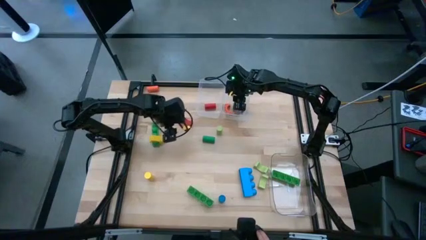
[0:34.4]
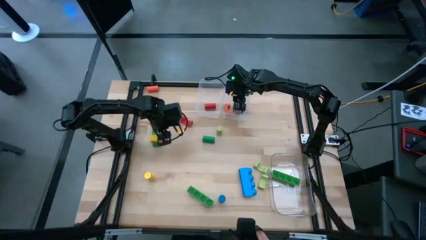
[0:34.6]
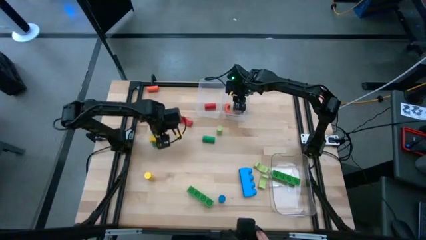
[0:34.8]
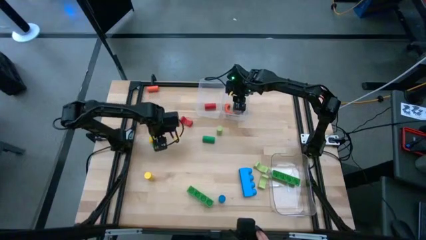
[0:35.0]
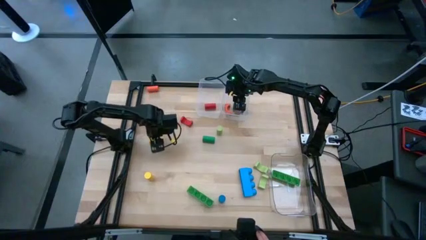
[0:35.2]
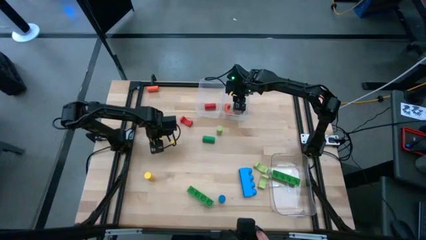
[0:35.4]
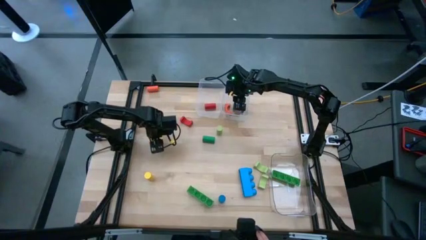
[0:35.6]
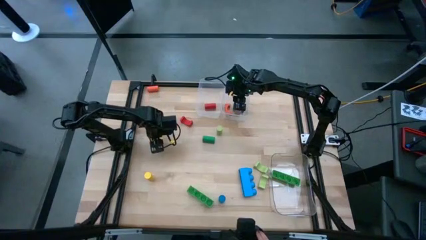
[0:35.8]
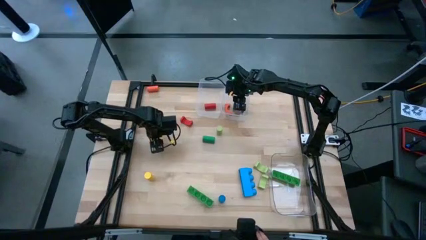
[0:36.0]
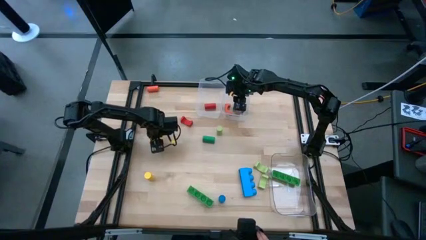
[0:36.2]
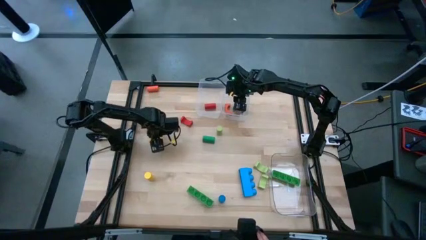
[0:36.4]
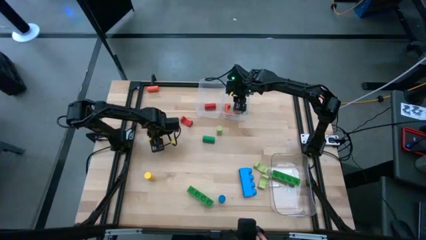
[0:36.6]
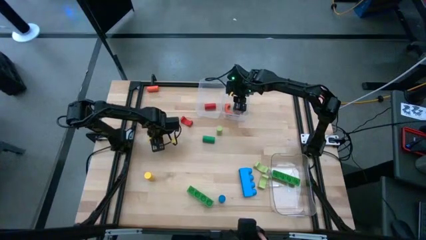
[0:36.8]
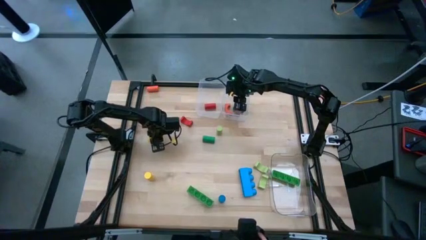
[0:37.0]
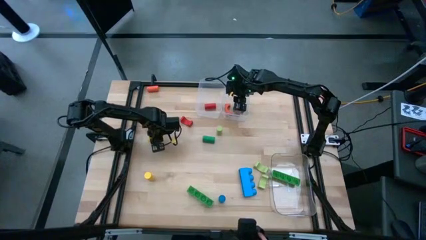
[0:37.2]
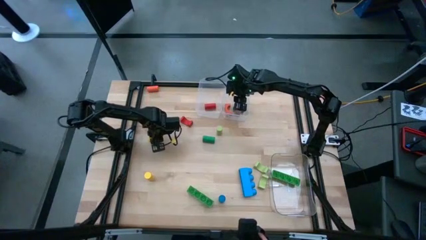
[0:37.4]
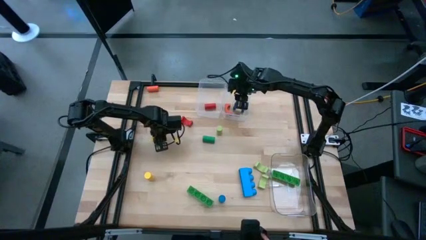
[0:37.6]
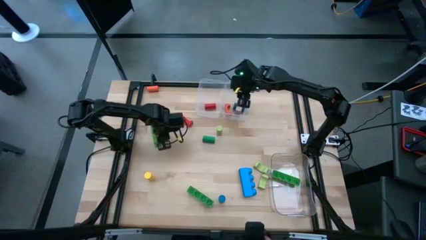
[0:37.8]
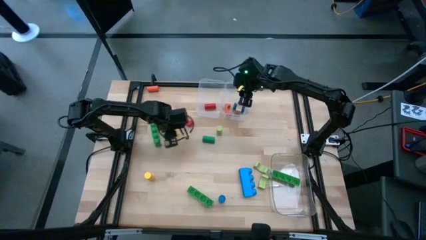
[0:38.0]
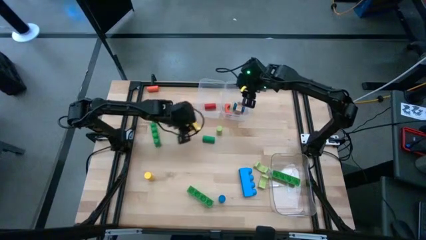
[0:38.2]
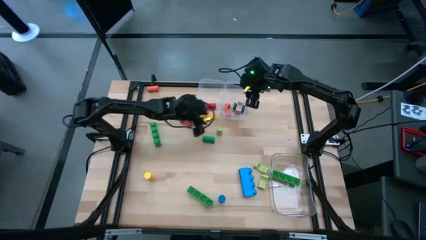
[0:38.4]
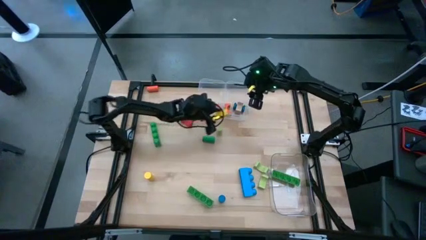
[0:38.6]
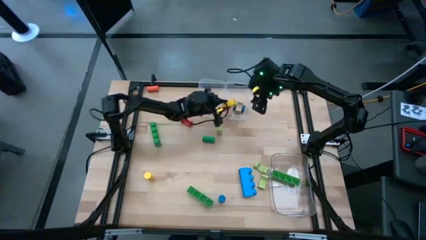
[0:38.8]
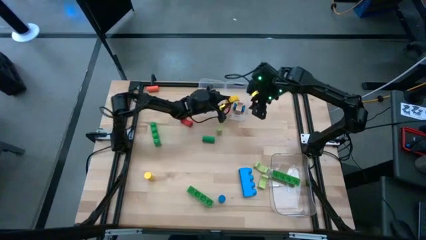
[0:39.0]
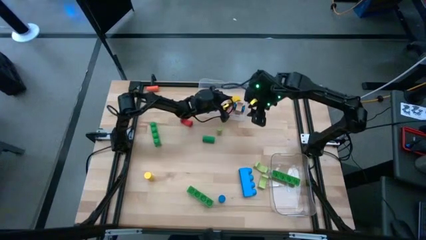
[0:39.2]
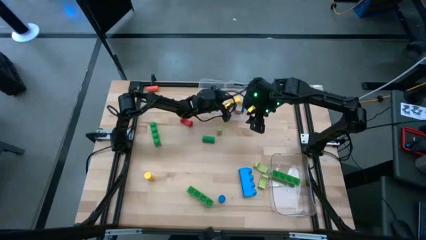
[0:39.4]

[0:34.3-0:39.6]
Task: Sort blocks by size
Put the yellow arch block into the right transparent bin

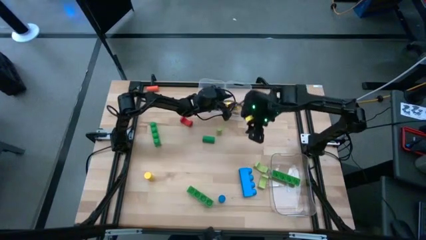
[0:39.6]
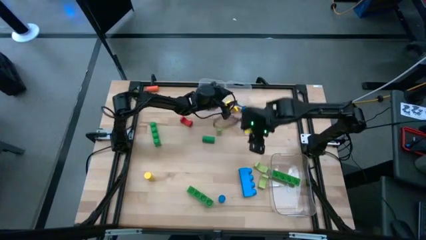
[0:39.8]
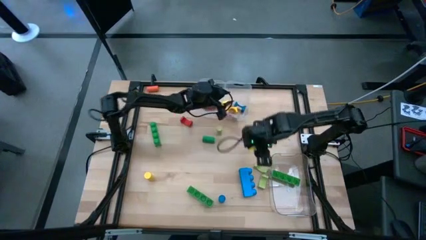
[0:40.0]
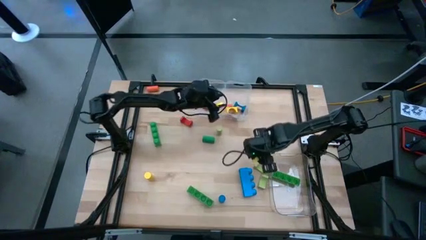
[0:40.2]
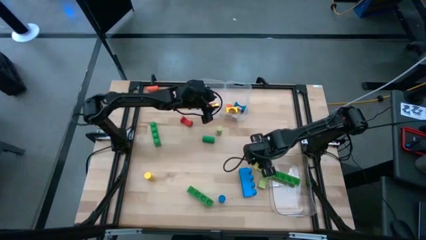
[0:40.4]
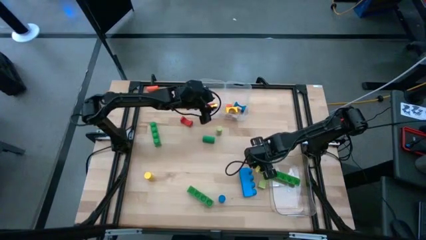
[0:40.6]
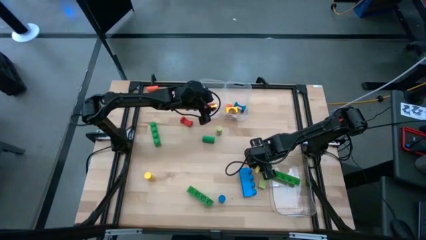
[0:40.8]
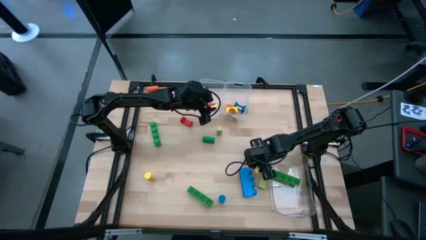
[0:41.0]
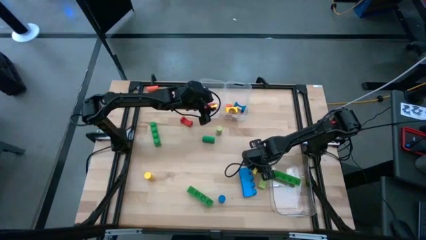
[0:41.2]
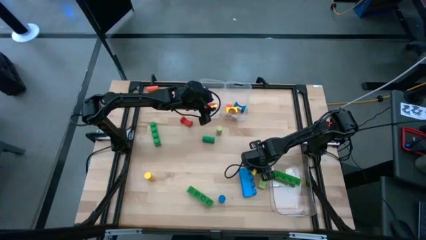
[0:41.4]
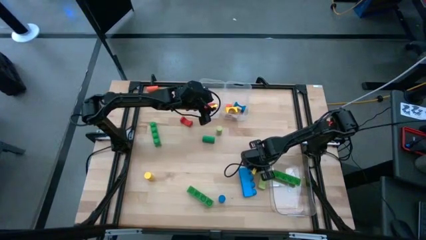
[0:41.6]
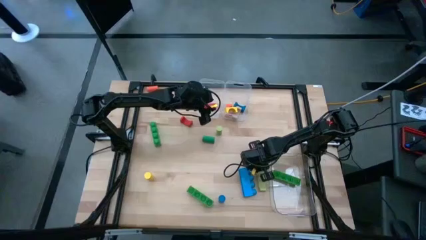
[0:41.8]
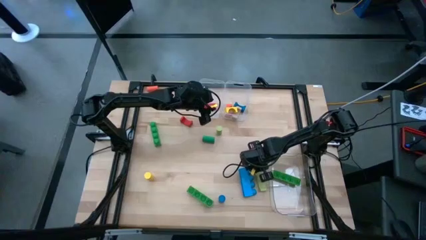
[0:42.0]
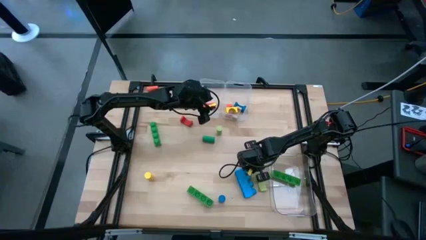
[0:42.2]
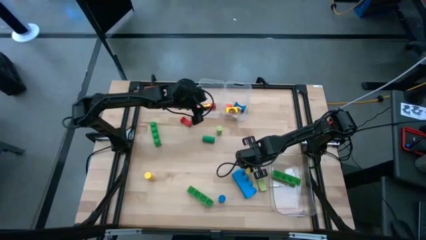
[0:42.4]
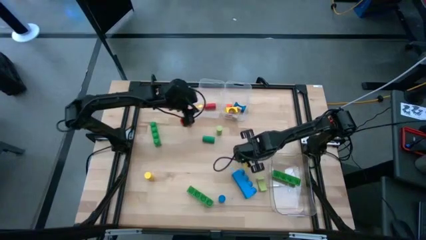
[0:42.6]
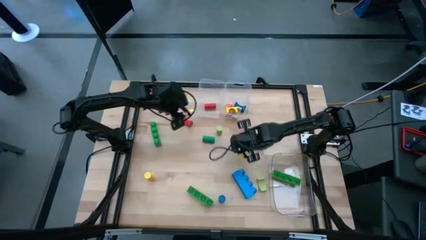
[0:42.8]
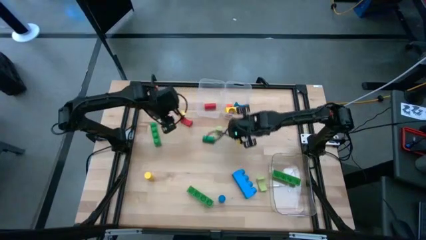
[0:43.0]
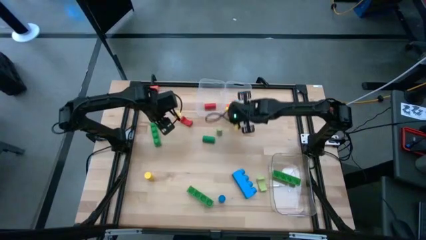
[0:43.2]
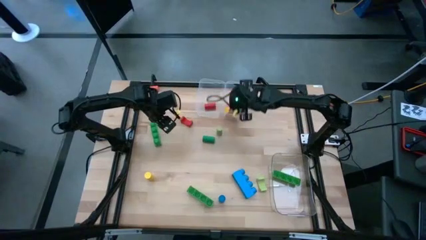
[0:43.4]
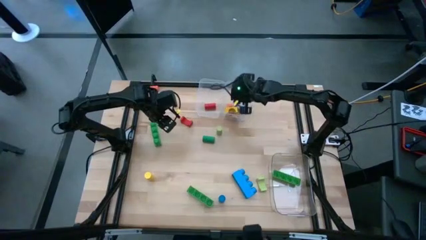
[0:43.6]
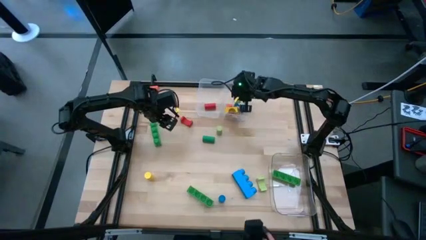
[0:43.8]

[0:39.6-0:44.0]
Put the light green arch block into the right transparent bin

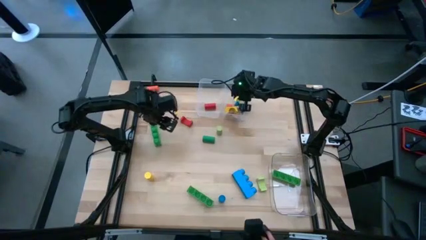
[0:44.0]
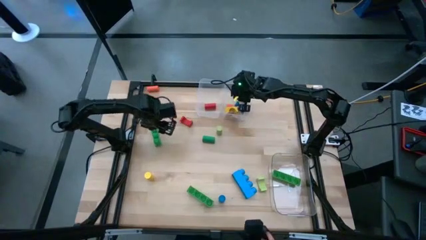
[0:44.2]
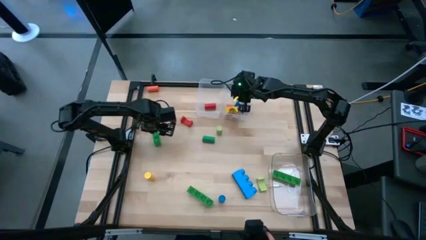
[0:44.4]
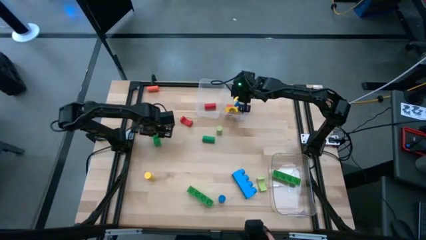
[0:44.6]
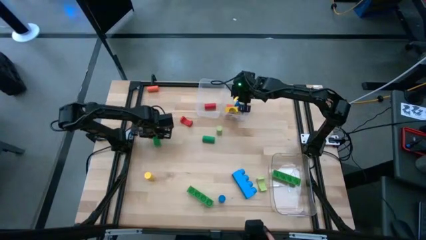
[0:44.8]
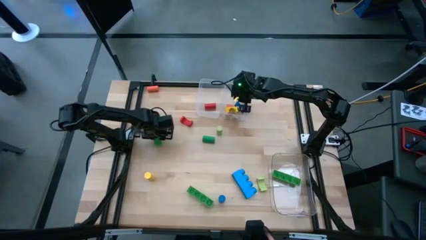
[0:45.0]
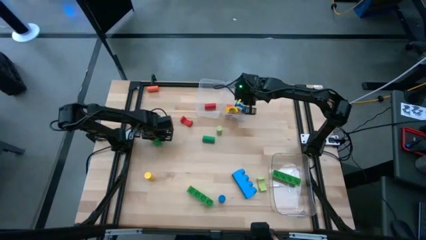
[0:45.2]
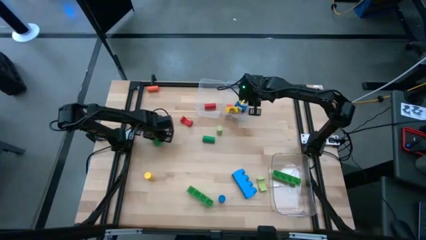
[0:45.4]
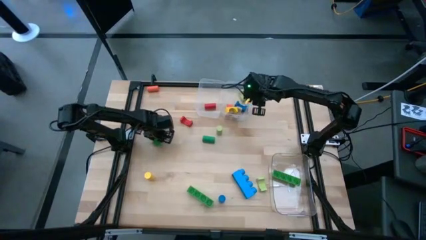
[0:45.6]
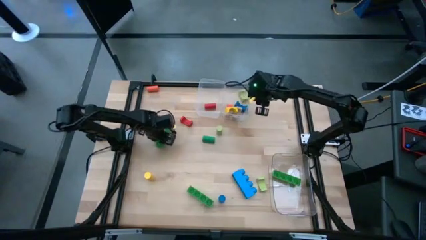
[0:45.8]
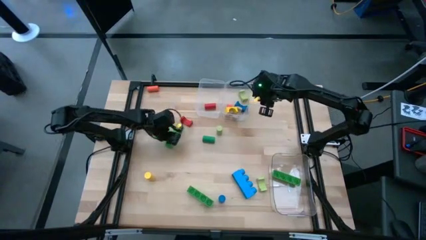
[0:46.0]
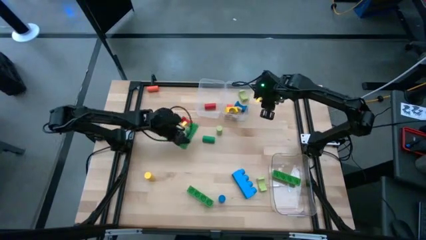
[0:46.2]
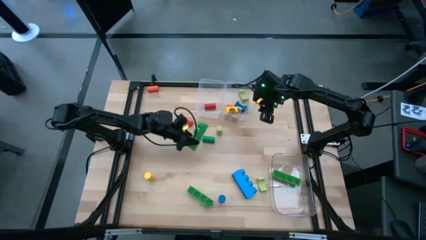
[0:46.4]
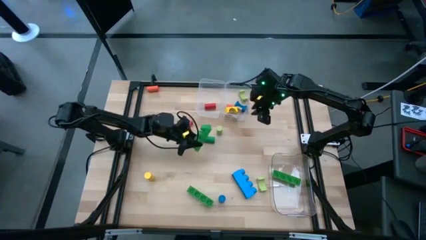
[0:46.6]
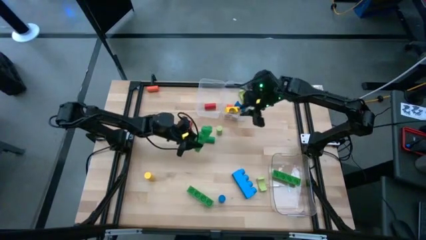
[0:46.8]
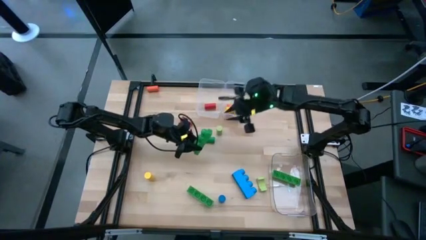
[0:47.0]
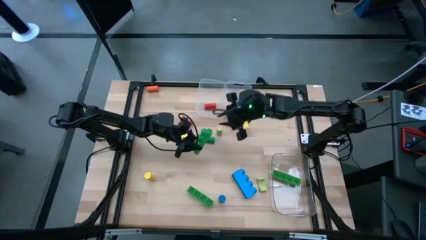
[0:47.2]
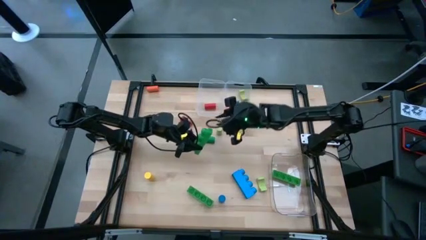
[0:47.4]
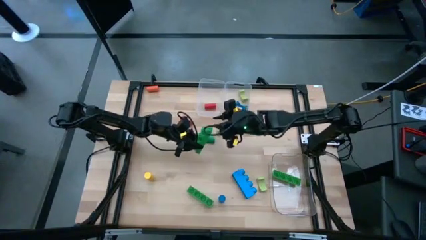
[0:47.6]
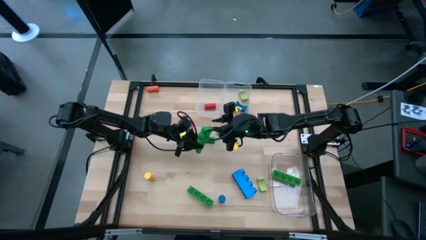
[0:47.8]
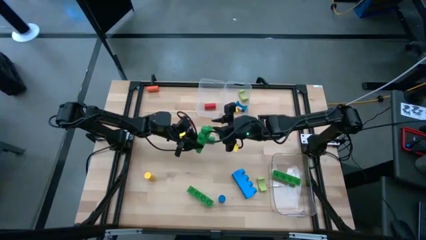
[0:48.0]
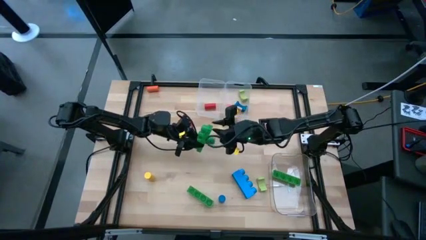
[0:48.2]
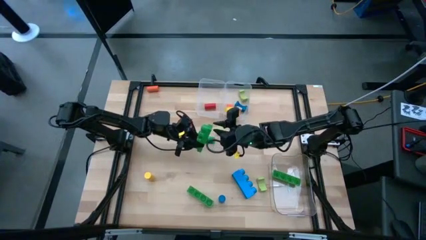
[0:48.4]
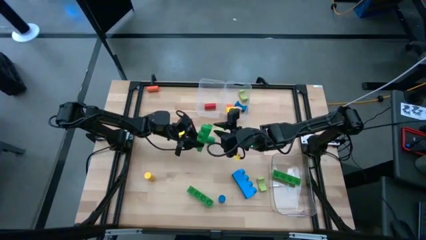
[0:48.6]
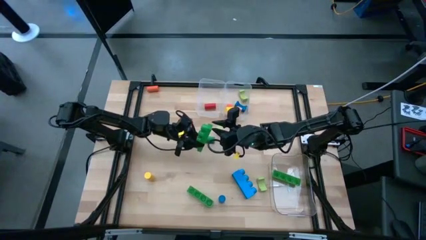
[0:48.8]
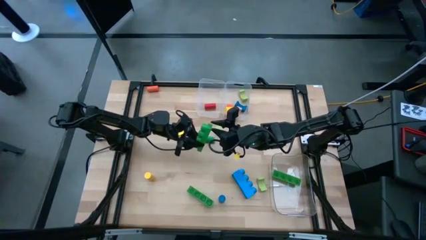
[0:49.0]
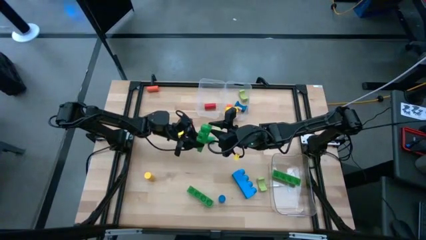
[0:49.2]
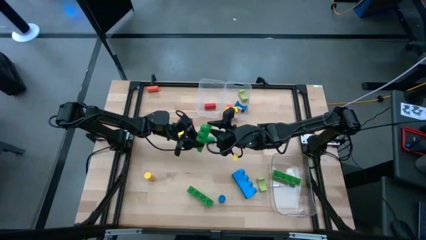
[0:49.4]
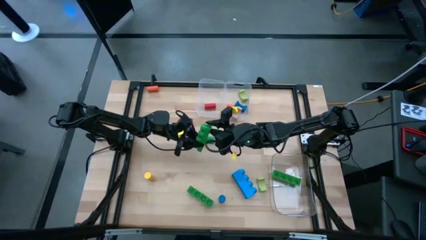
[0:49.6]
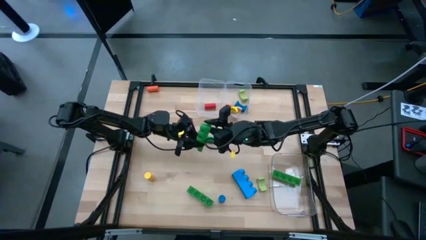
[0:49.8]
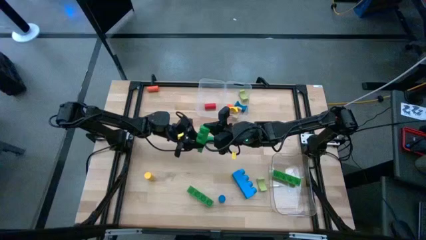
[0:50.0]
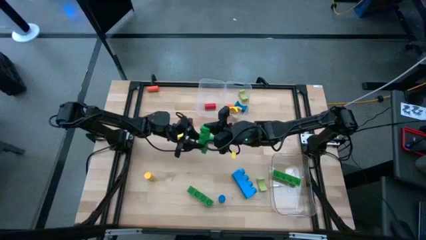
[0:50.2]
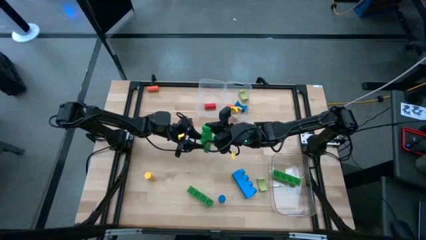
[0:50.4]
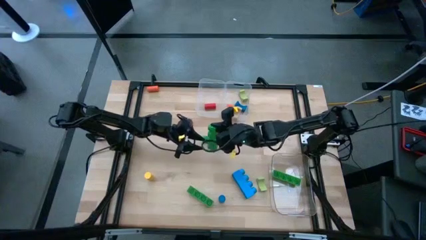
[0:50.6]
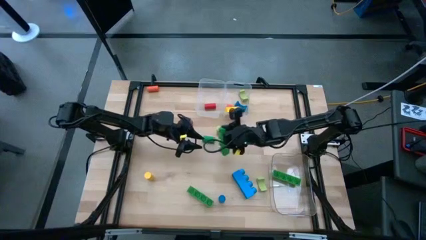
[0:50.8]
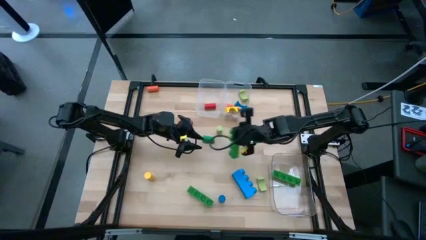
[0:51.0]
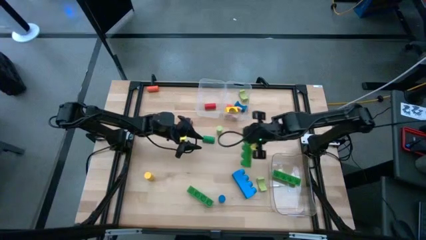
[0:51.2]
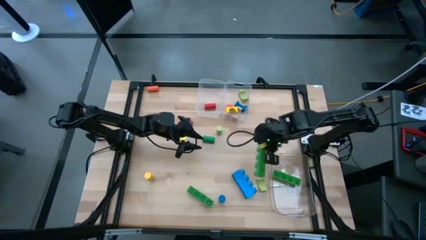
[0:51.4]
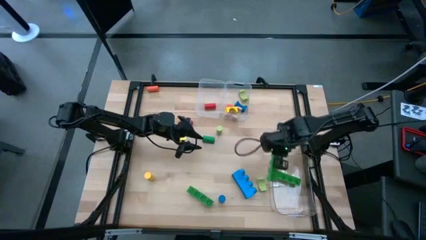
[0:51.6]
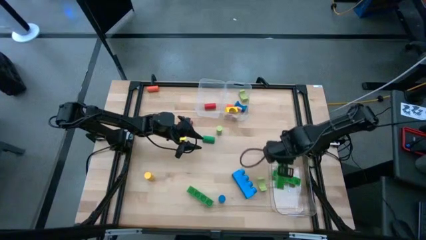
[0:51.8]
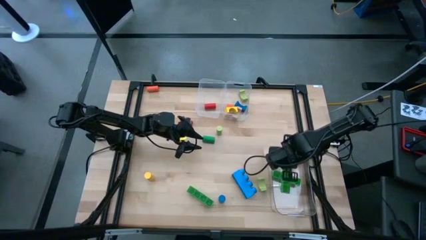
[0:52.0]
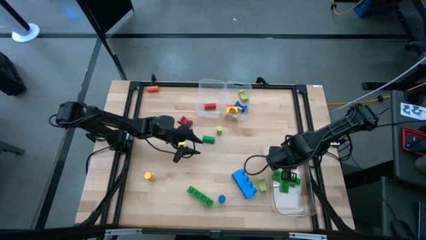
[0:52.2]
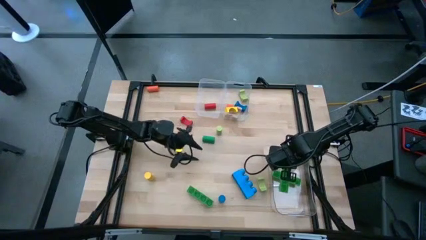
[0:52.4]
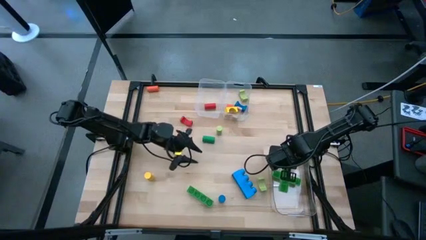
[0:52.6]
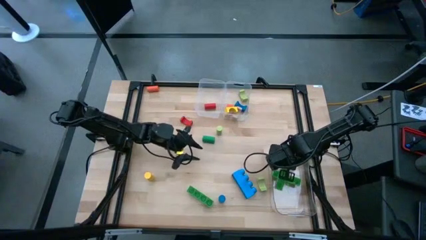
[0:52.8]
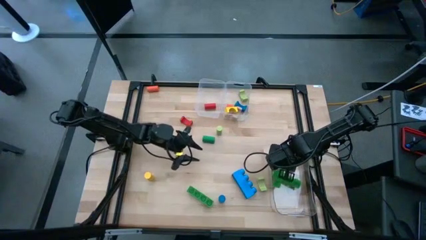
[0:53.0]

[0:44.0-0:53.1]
Put the green 4 stud game piece into the bottom transparent bin
